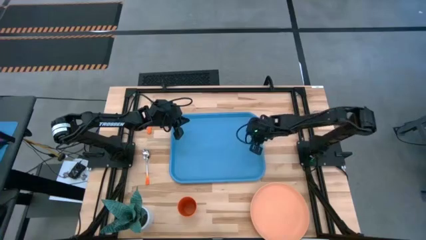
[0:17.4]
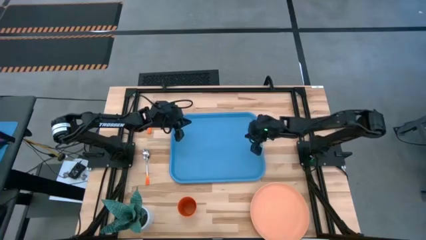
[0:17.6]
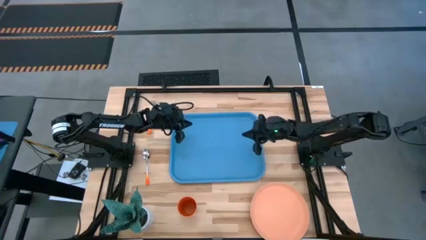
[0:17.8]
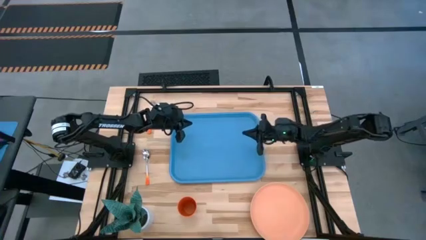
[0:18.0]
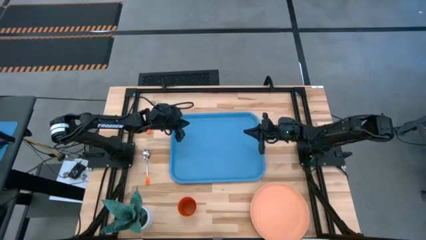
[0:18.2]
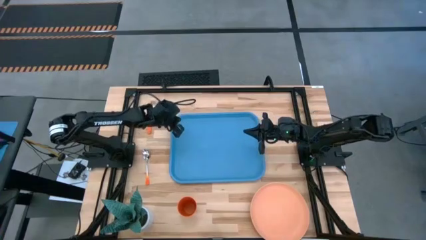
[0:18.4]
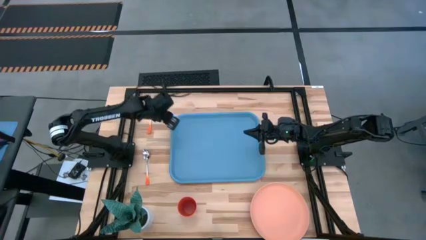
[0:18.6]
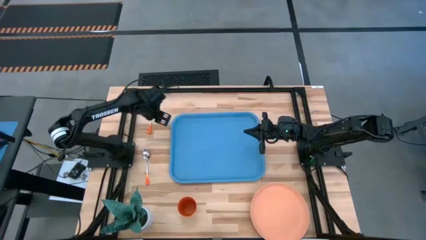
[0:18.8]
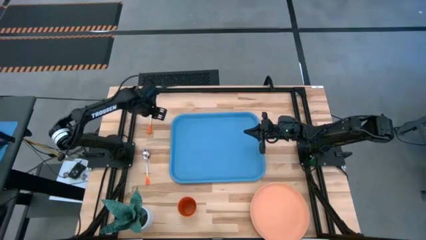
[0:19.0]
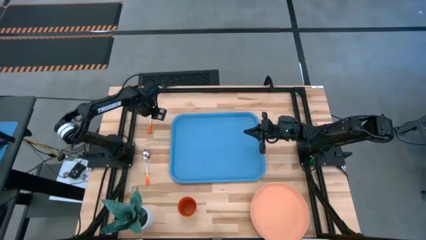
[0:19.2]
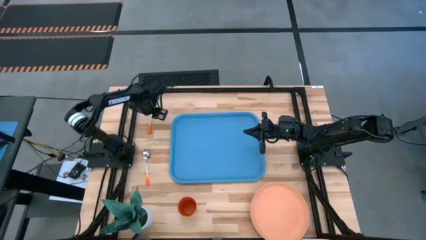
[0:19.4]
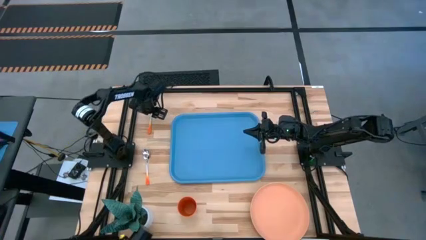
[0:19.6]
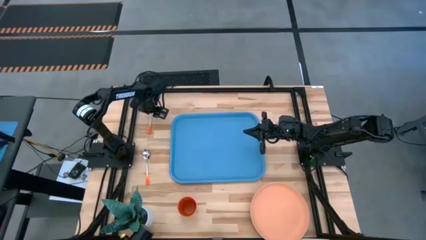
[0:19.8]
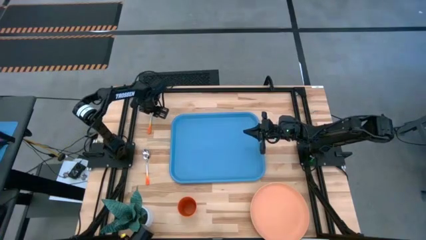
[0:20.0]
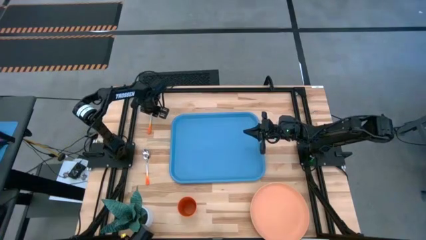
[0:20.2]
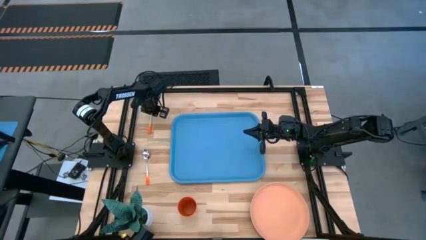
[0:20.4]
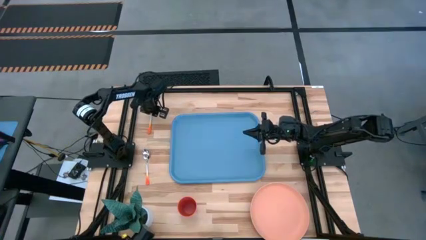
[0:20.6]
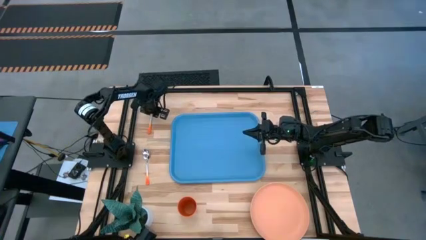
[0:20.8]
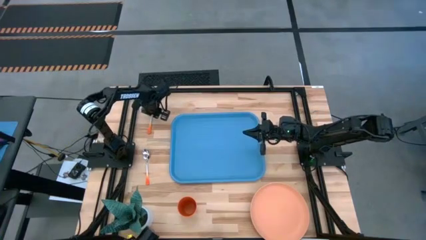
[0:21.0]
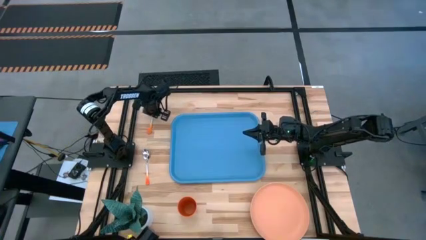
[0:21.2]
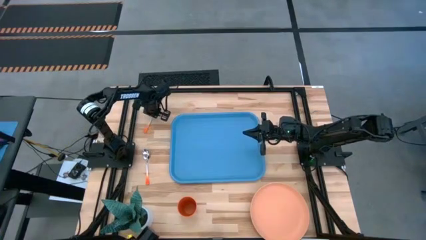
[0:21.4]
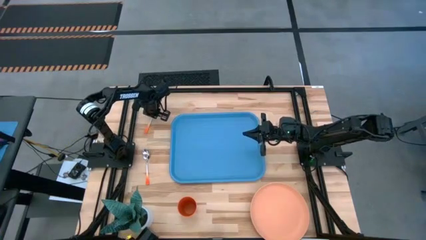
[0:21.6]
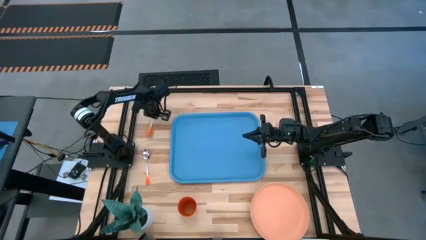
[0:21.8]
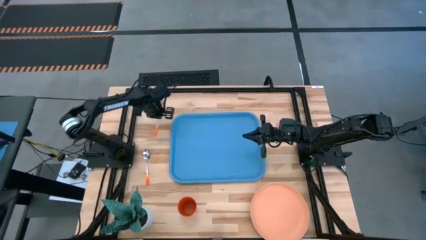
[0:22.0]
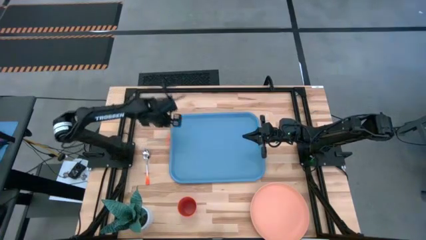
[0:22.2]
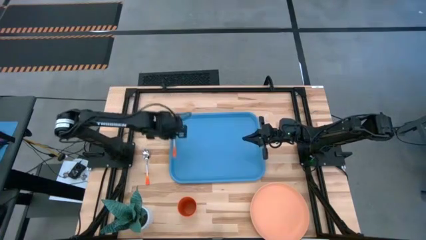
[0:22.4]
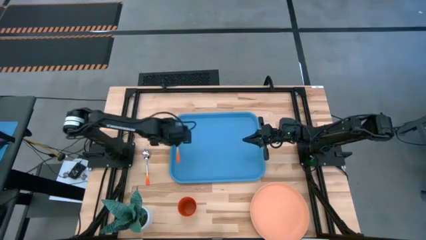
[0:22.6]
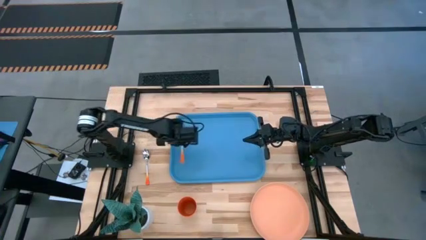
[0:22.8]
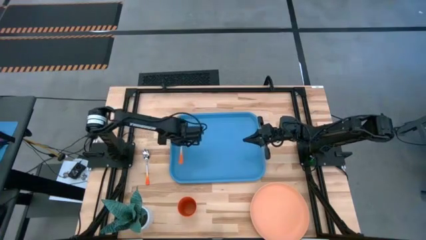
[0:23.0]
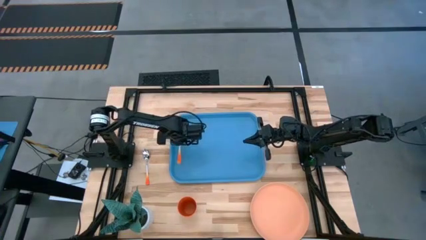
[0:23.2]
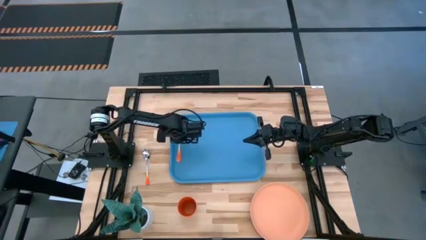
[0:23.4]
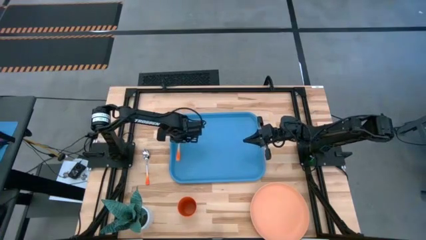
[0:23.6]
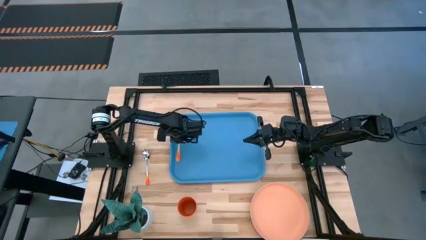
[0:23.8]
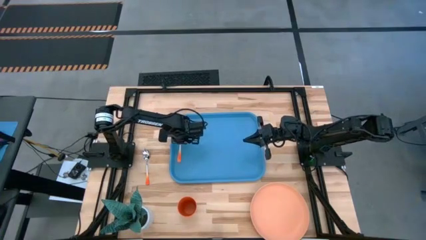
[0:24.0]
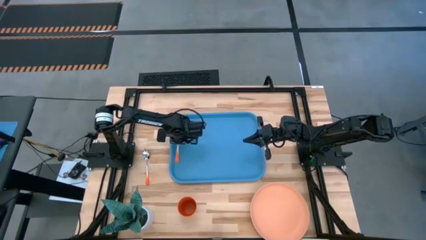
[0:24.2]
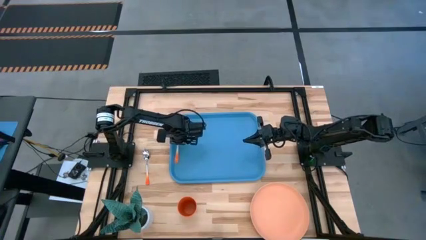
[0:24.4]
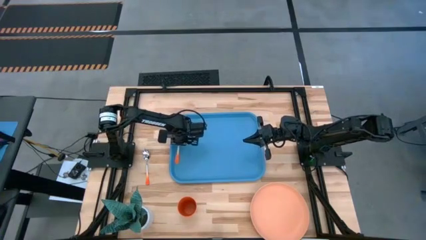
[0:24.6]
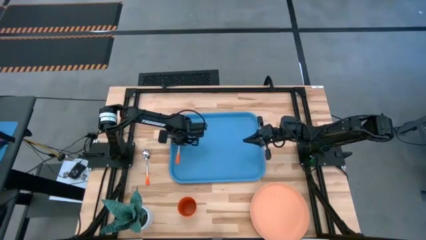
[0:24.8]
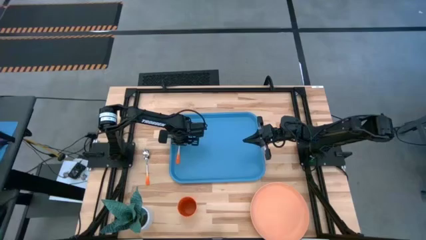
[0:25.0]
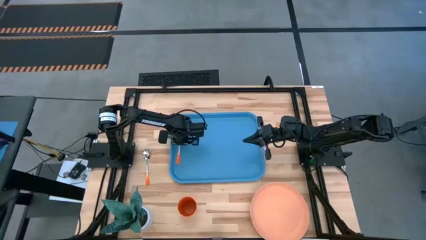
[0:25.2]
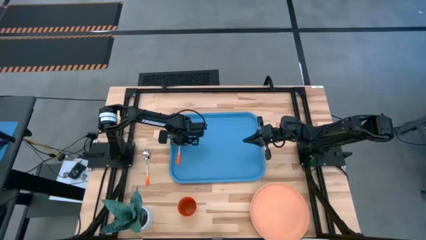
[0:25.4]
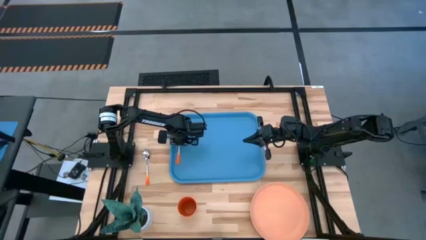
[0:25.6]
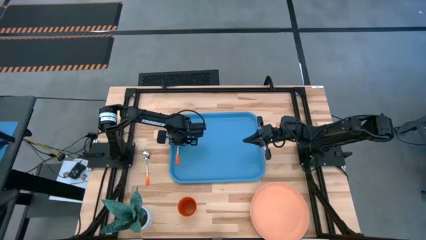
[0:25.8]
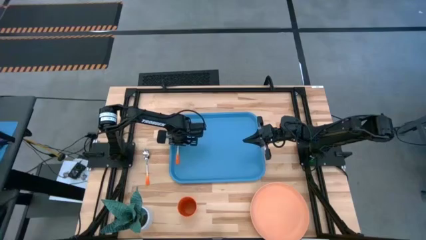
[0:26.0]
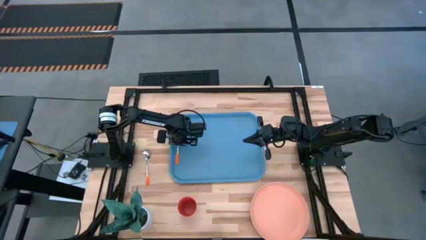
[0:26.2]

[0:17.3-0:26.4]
Task: Pick and place plate/cup/fork/spoon on tray
Put the orange fork on the left side of the blue tray

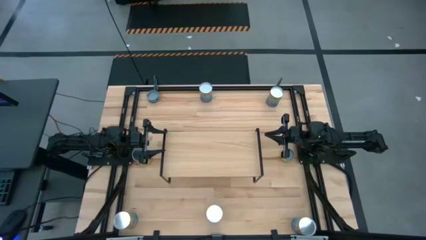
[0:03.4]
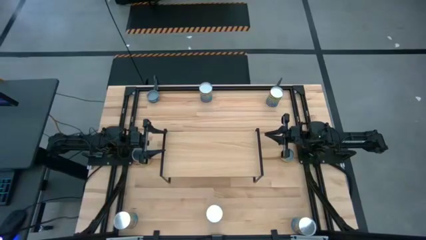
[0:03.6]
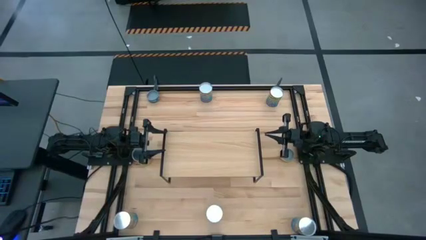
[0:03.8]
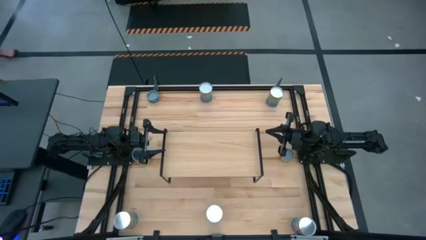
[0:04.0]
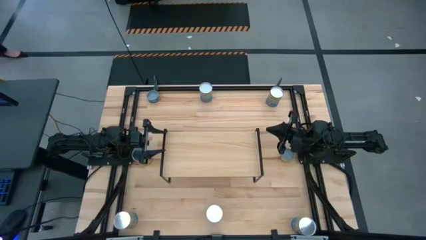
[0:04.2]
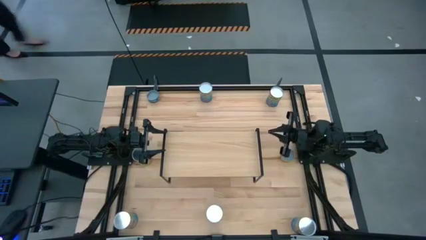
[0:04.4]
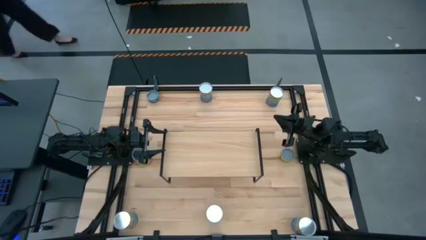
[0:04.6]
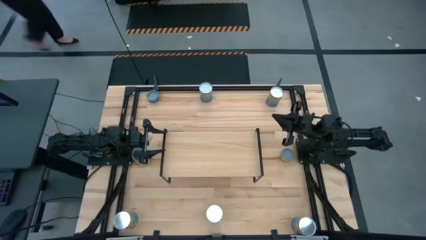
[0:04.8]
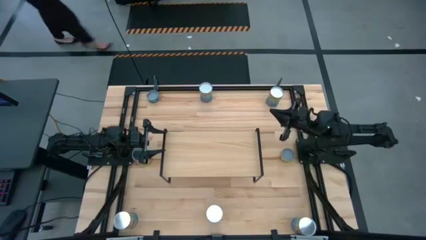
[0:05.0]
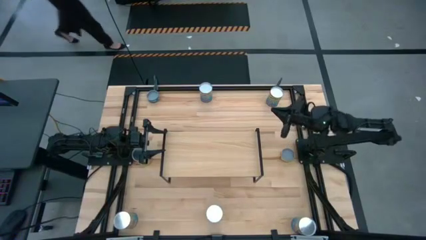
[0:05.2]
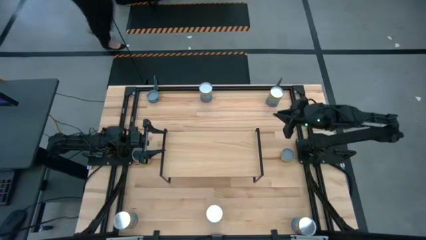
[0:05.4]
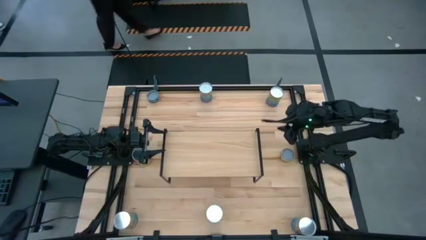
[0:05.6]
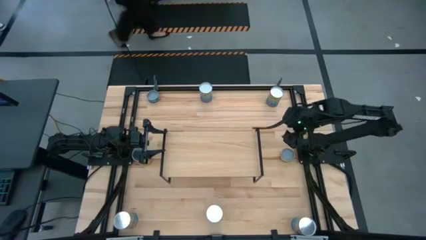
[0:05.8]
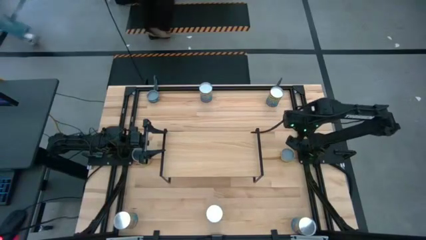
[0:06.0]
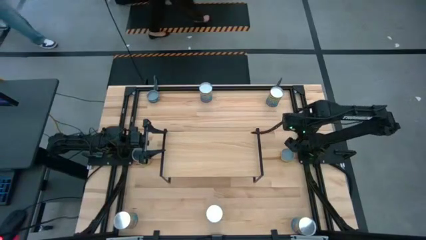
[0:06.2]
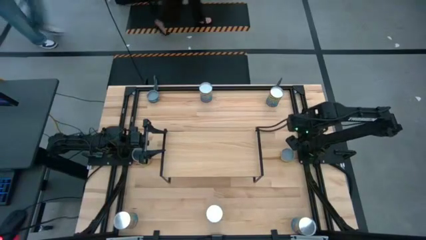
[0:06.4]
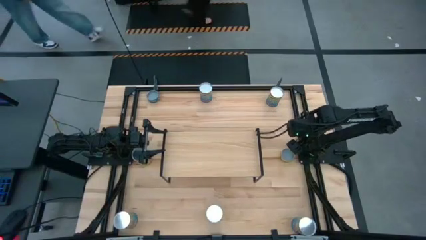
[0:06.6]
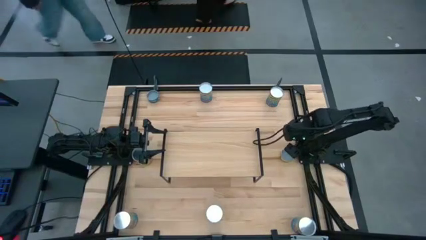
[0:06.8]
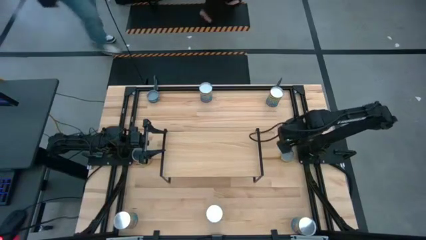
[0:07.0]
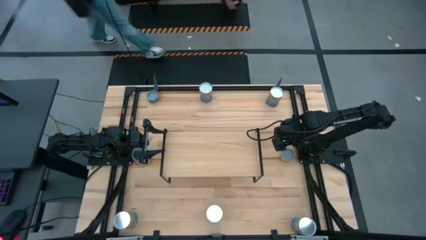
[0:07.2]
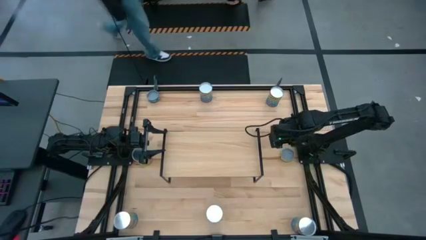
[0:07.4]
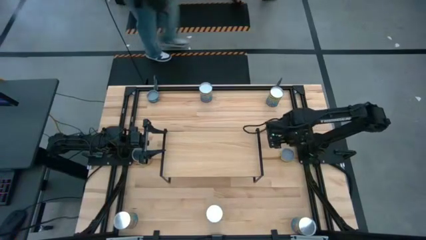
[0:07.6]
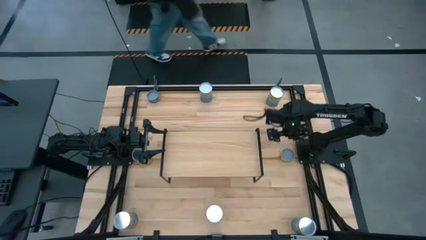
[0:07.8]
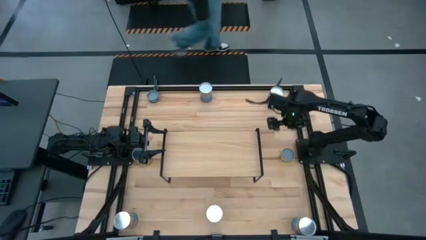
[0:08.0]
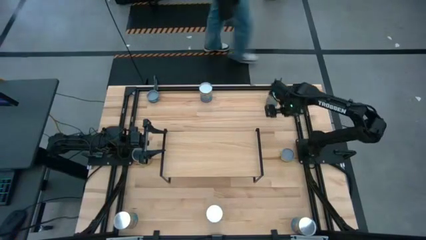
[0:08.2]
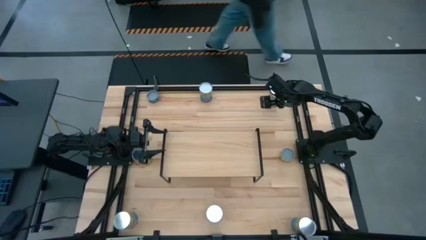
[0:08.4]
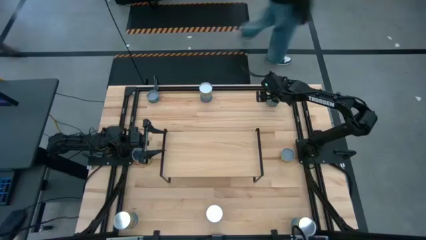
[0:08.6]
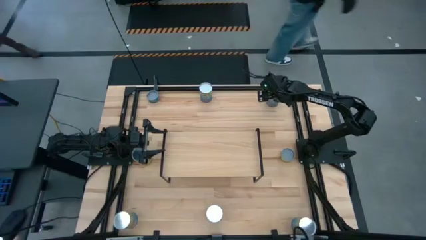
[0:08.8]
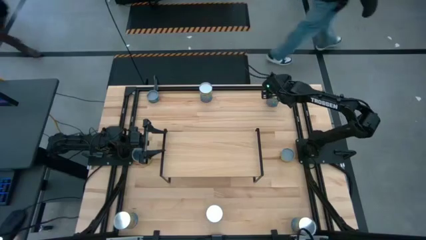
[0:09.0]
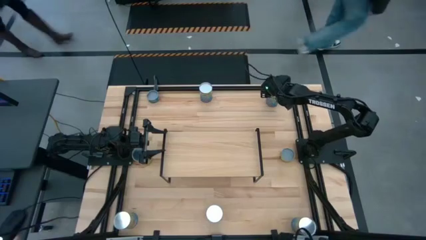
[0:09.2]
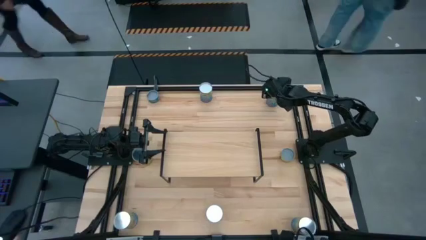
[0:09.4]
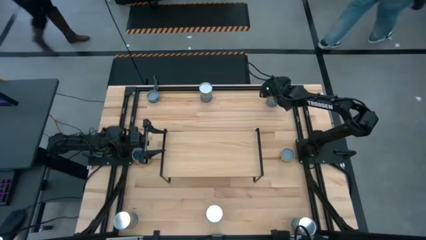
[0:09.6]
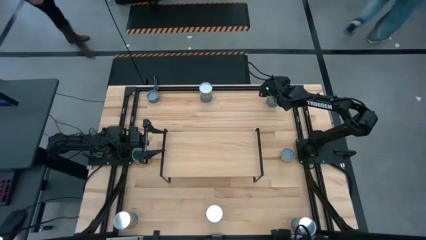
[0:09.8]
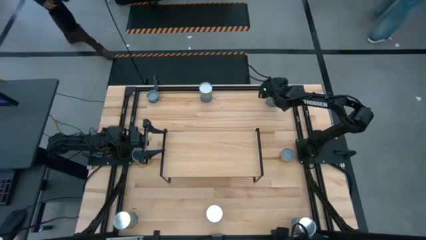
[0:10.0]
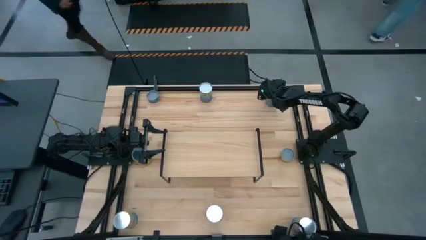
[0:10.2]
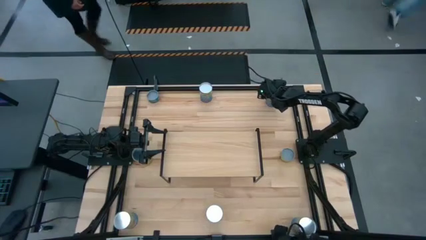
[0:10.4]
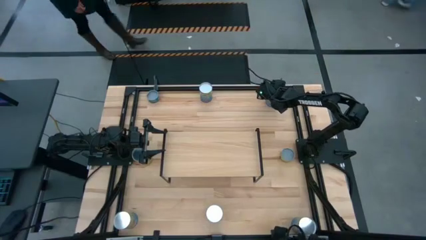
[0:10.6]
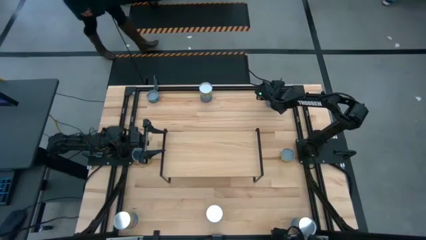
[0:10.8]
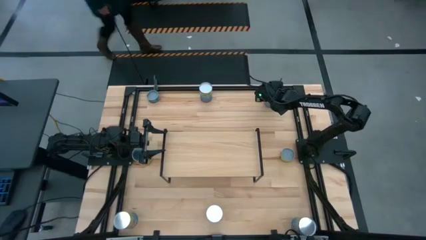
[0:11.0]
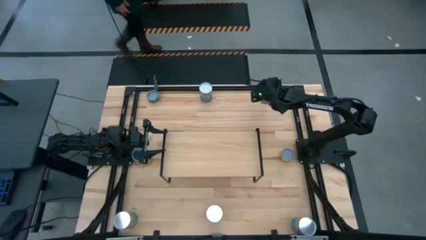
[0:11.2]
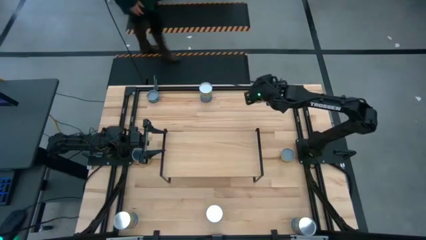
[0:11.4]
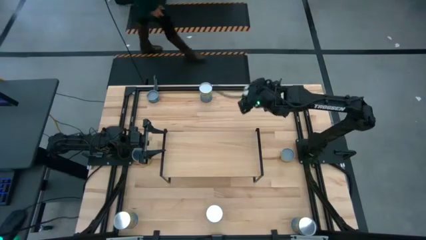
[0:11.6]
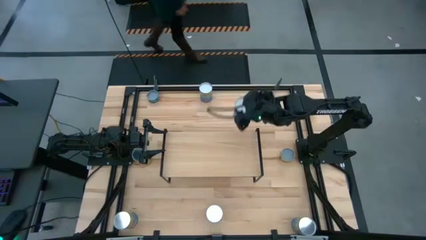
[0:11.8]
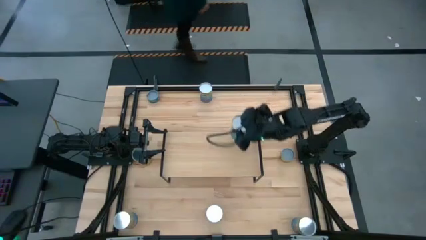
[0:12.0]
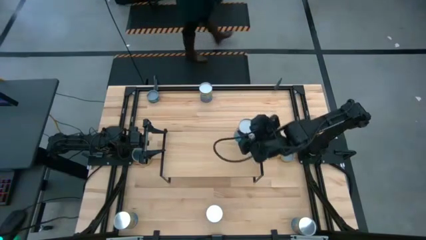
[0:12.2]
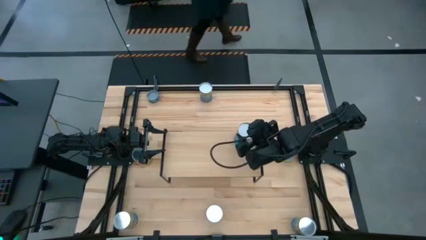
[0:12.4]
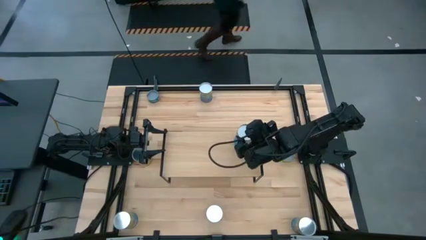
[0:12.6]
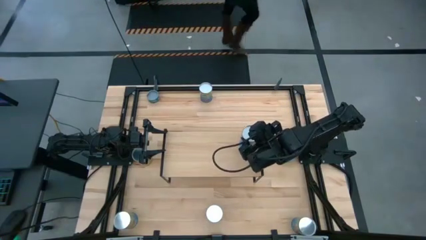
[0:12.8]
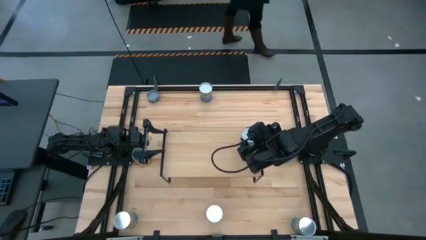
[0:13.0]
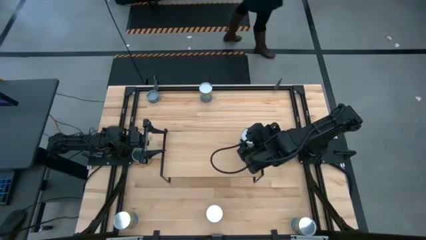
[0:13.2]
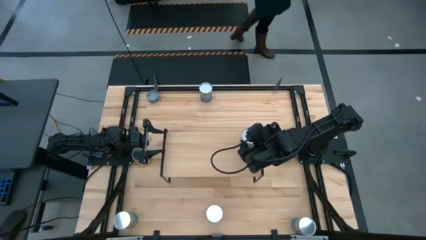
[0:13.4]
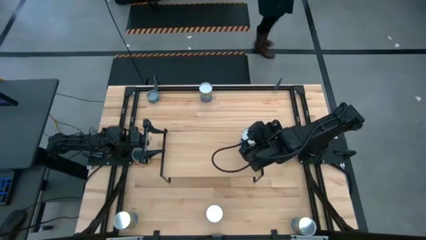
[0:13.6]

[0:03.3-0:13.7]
Task: Pick and place cans onto a shelf
Put the right canned cherries on the shelf
